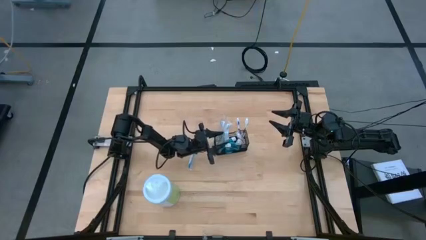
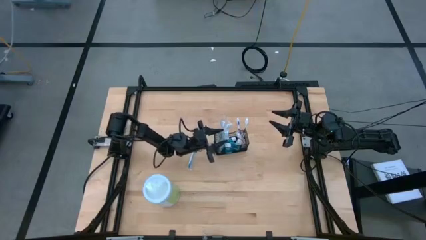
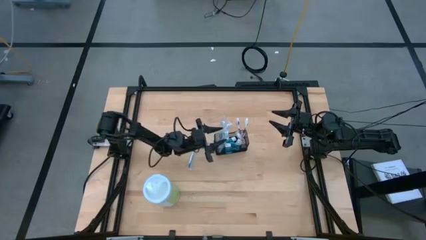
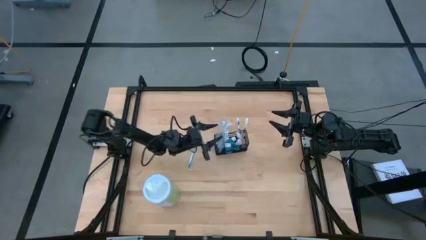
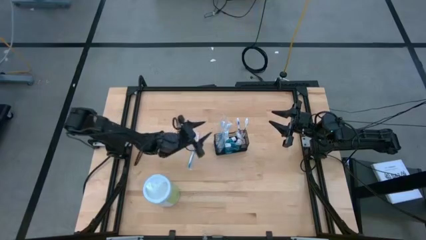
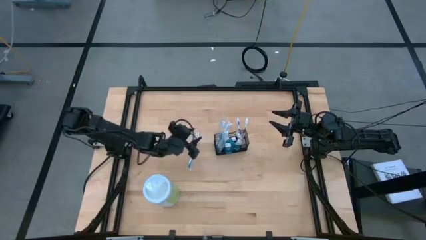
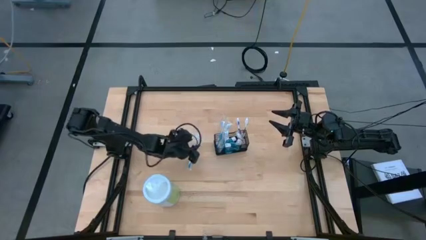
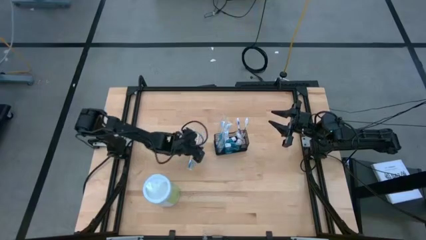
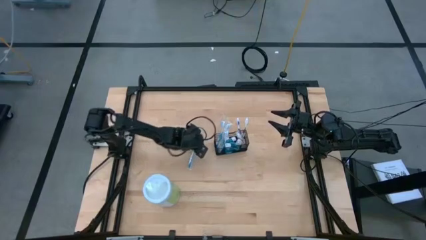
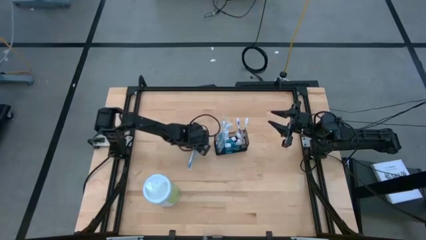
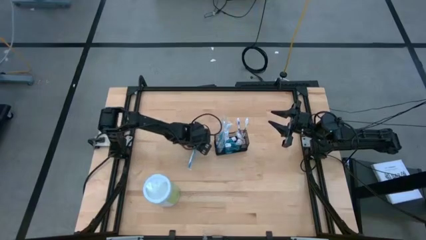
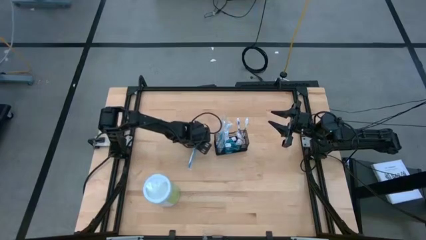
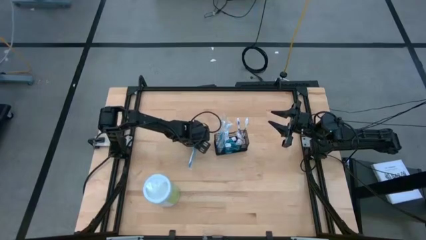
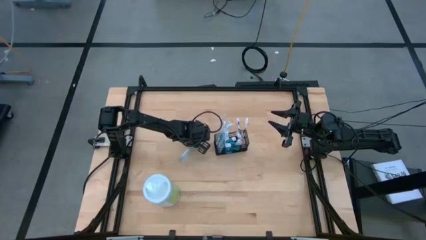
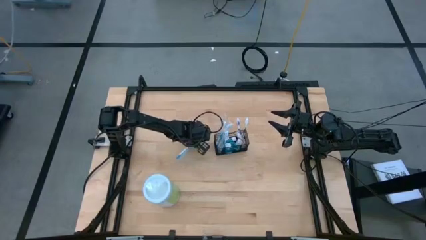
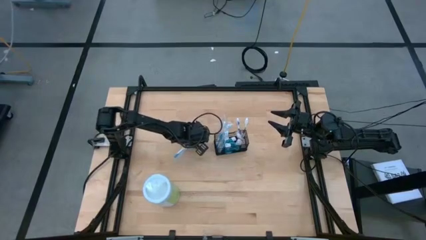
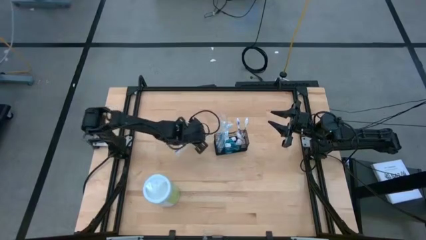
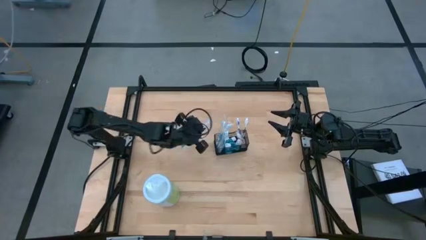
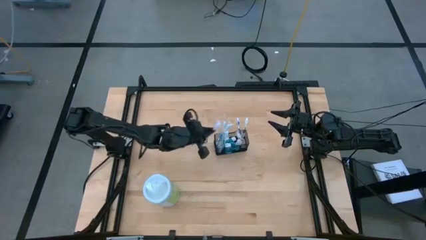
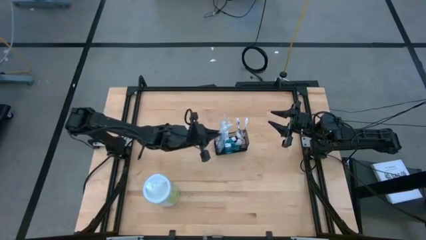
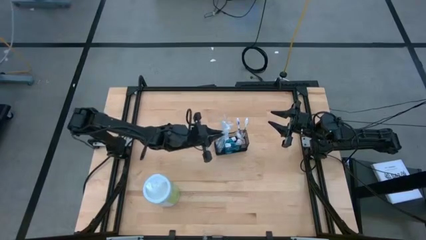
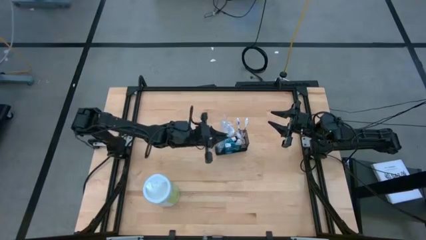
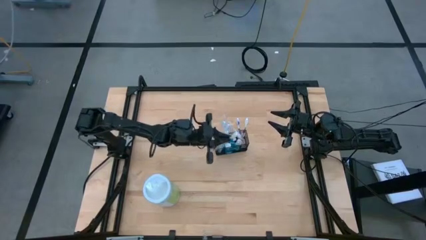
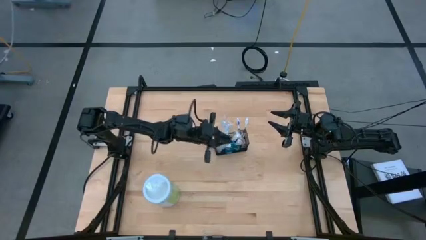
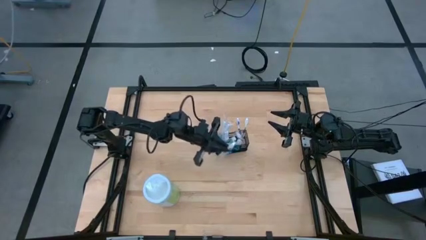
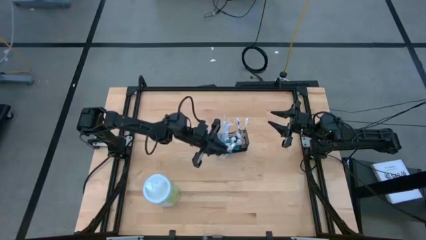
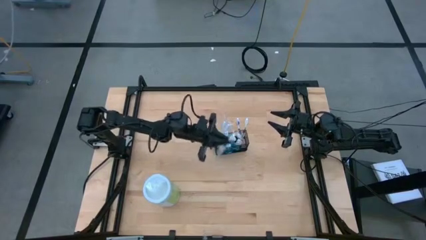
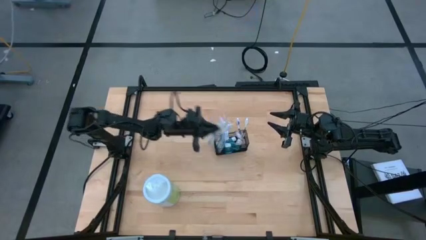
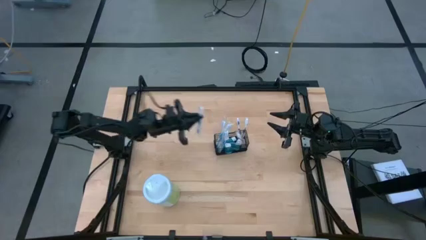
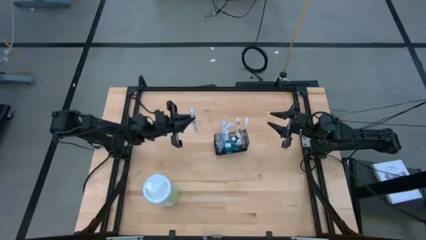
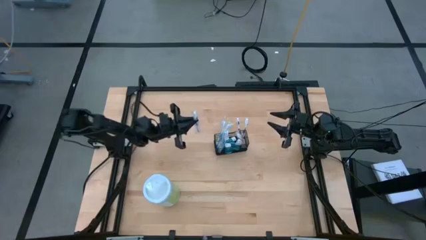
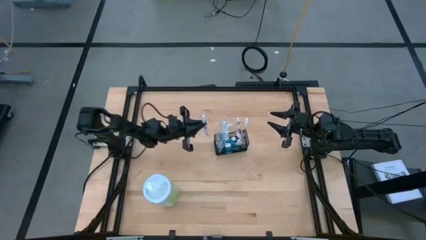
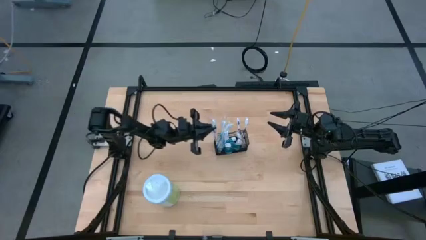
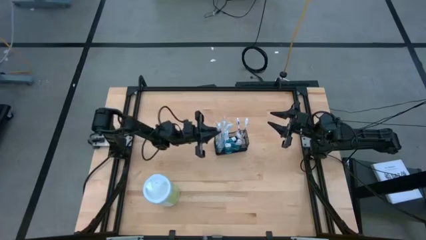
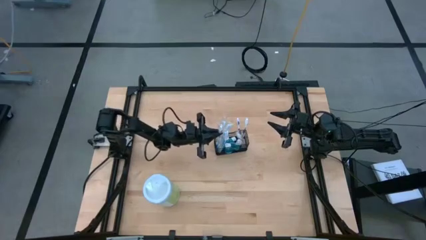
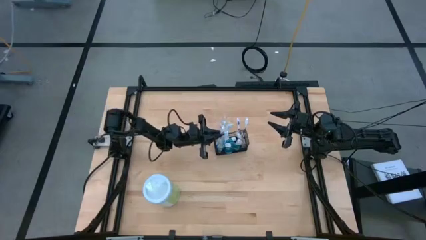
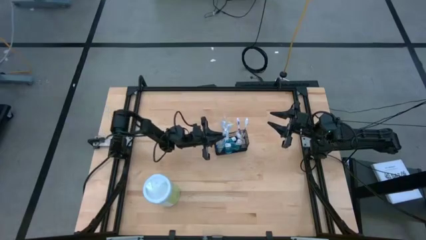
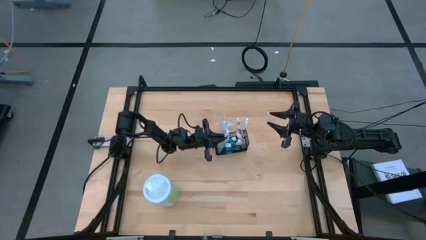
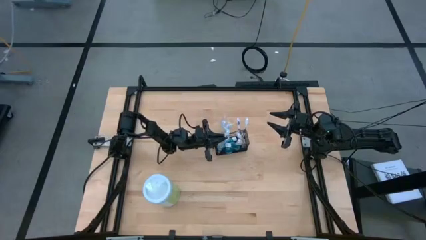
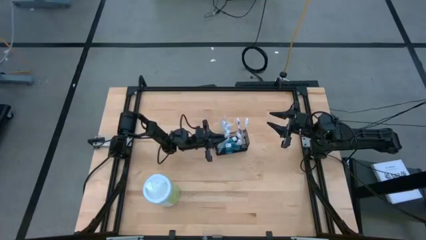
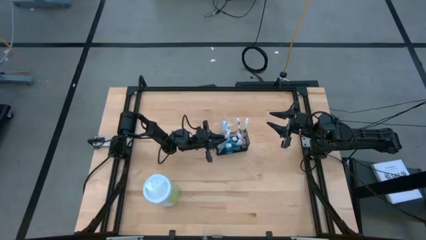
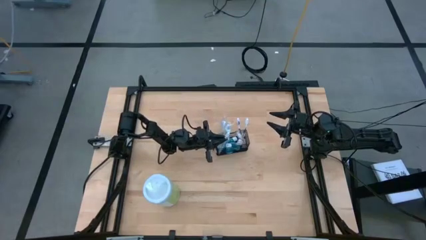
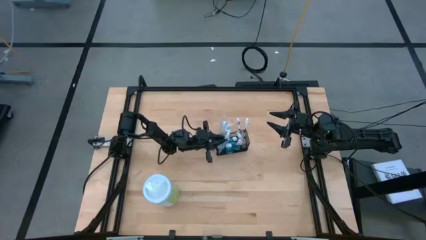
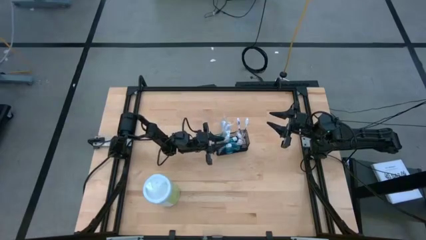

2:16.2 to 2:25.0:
Task: Pick & Place toothbrushing station
Put the blue toothbrush into the black mesh organizer

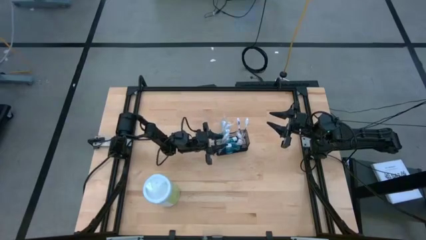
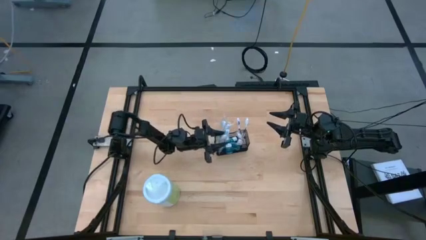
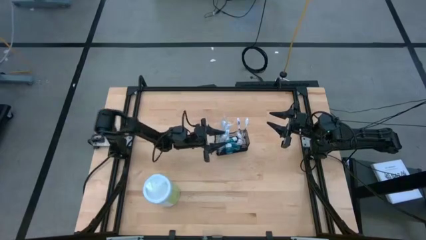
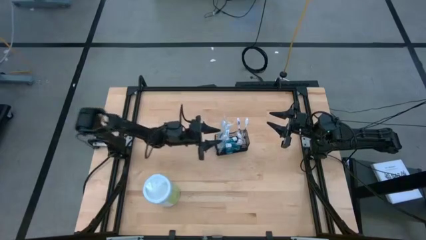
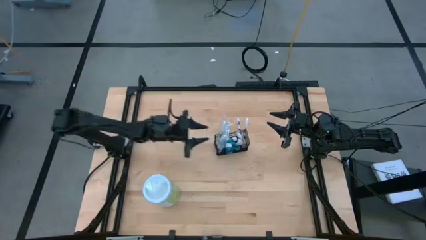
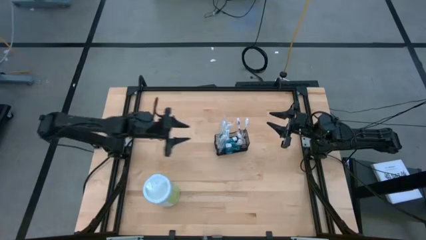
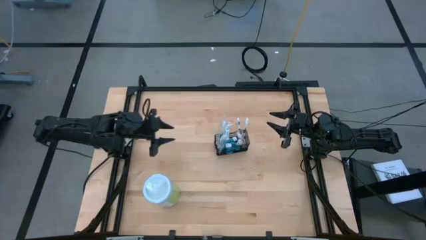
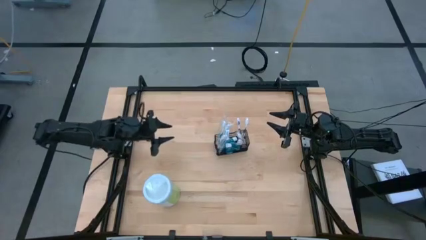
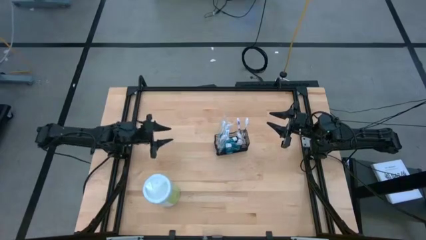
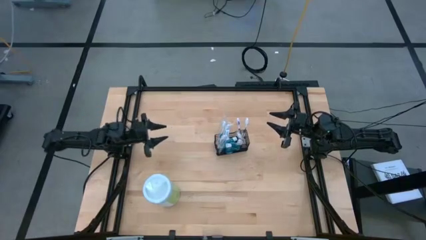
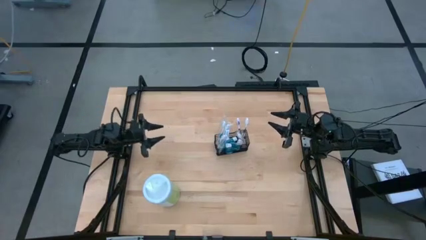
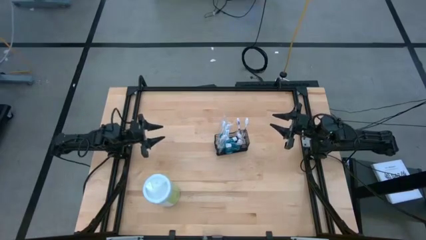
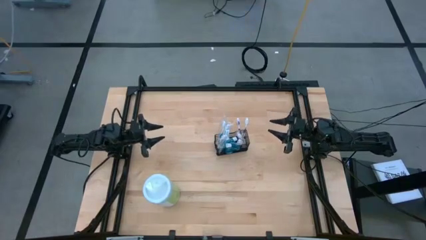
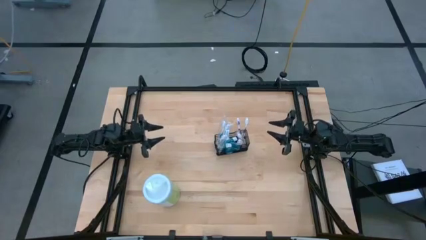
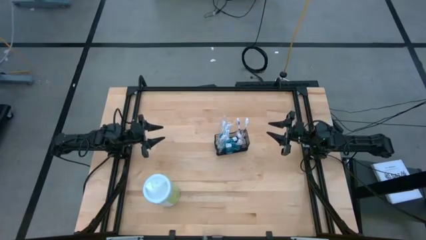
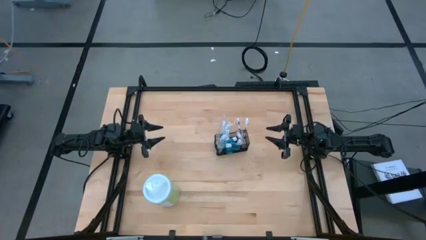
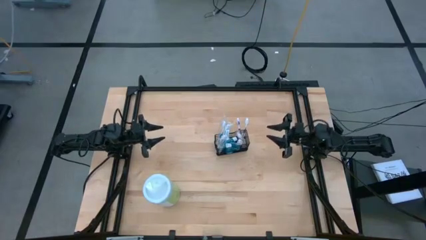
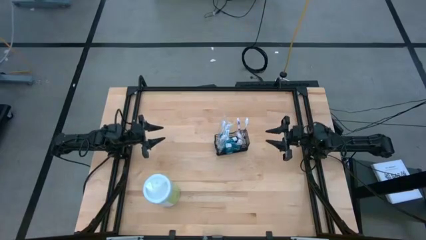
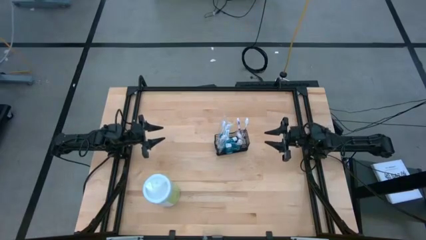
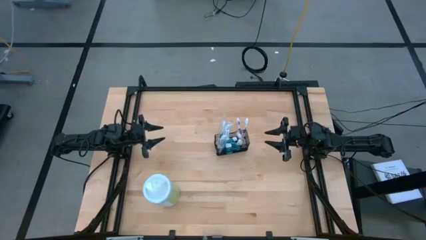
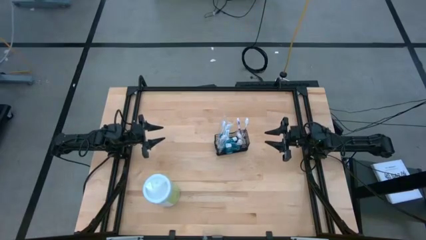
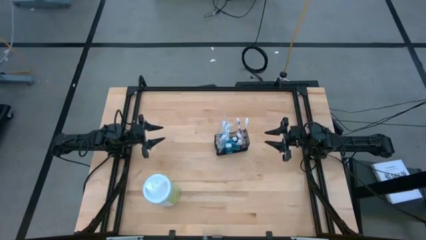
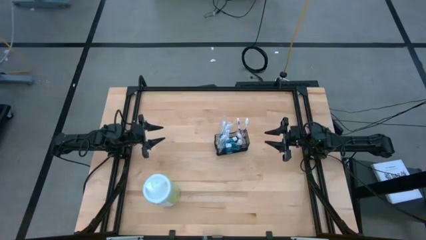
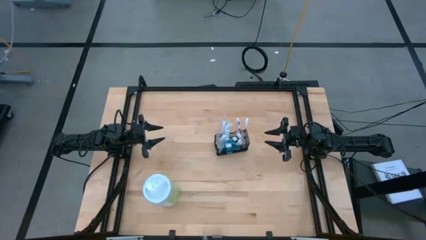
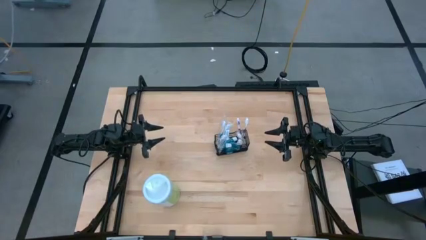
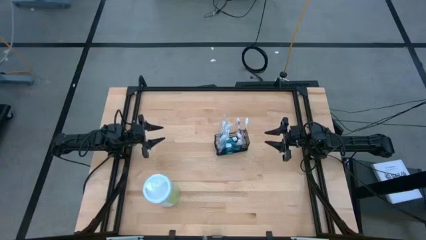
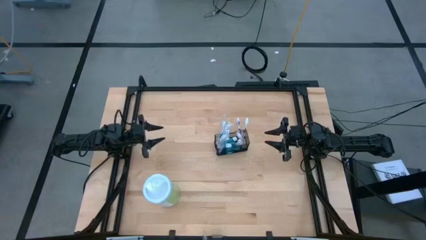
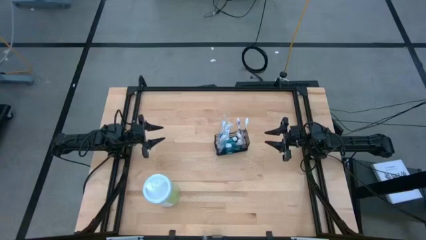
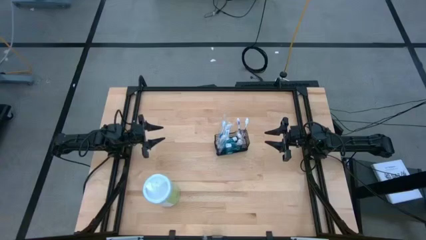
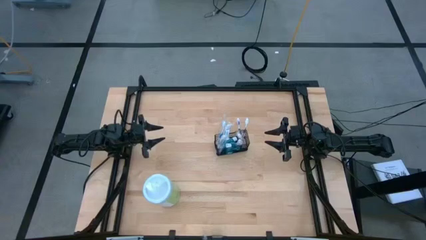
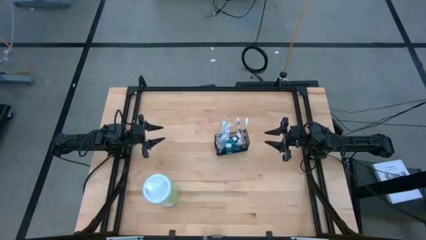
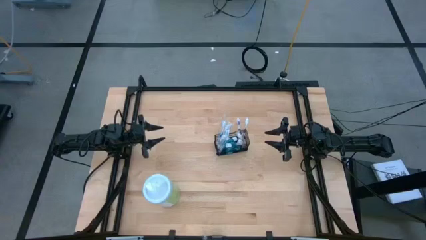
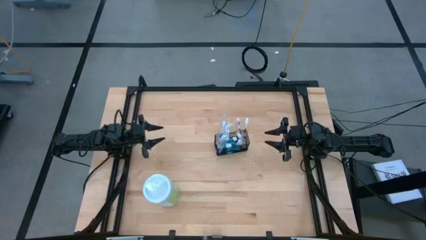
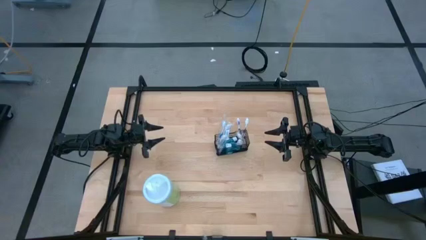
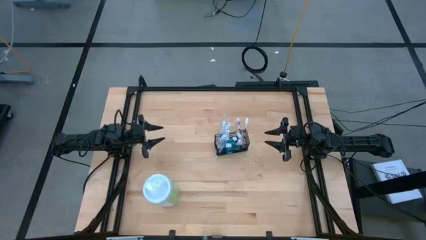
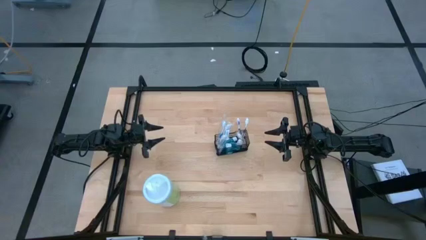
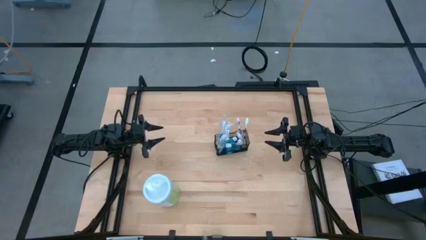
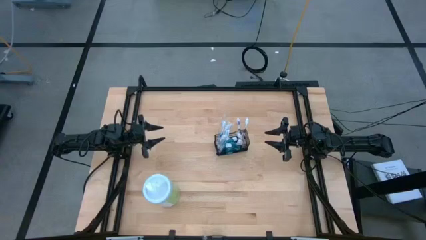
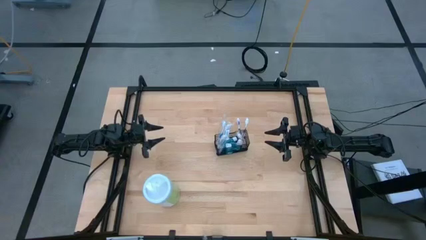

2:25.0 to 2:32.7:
Return to Home Position
